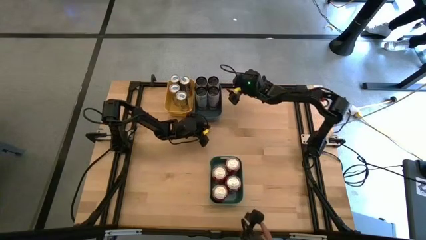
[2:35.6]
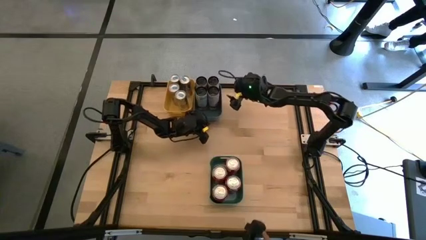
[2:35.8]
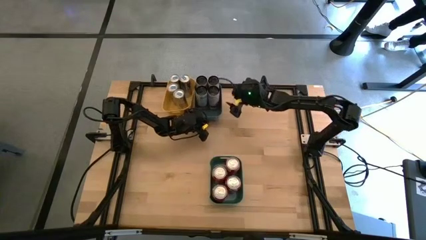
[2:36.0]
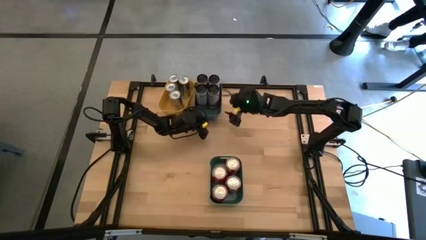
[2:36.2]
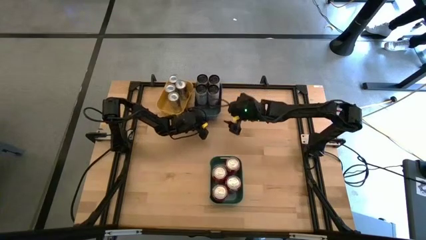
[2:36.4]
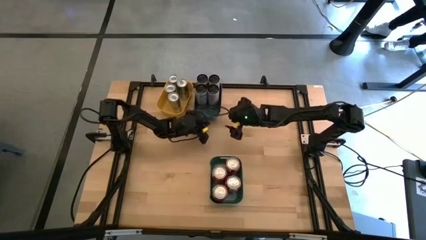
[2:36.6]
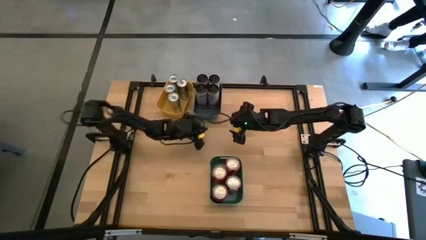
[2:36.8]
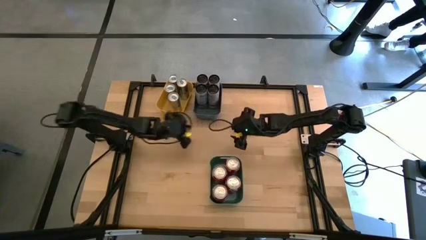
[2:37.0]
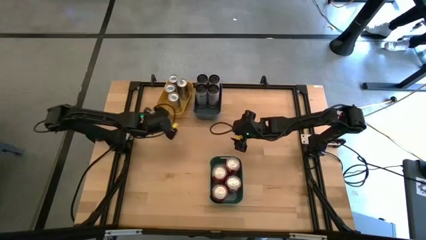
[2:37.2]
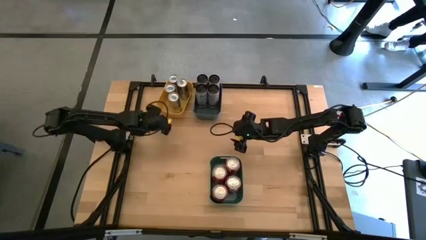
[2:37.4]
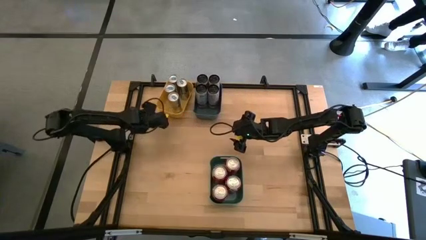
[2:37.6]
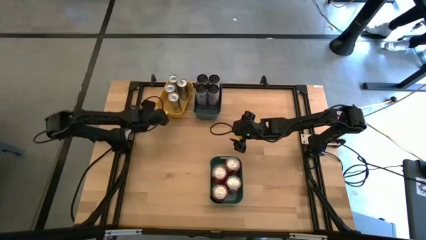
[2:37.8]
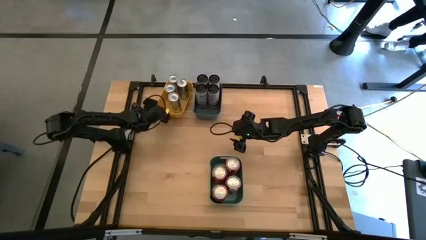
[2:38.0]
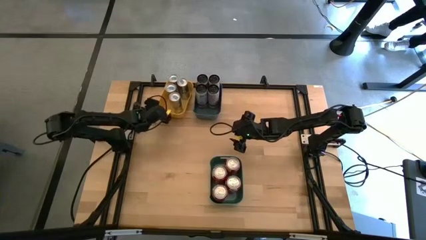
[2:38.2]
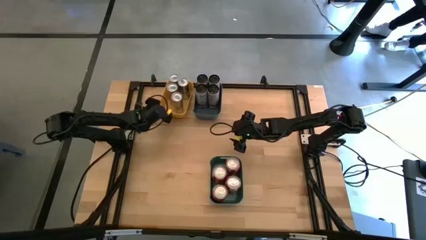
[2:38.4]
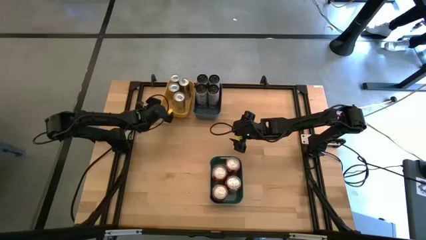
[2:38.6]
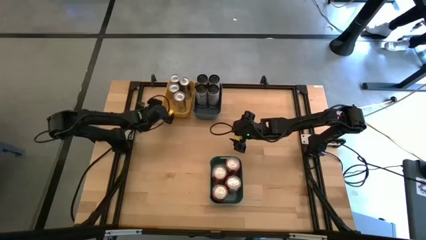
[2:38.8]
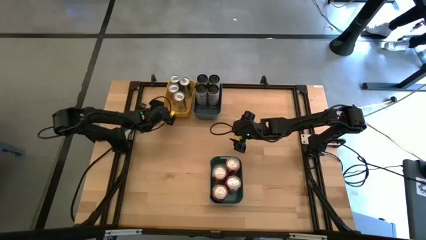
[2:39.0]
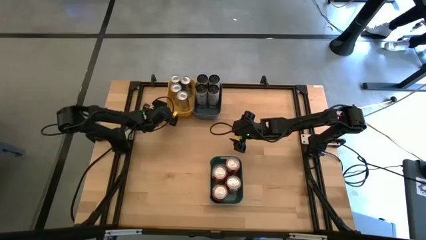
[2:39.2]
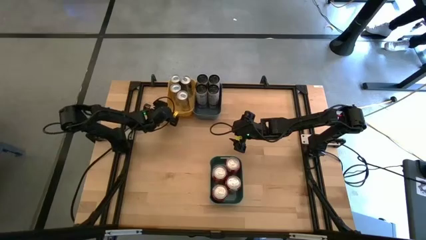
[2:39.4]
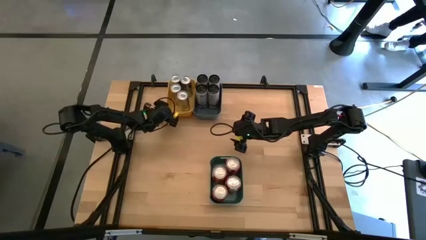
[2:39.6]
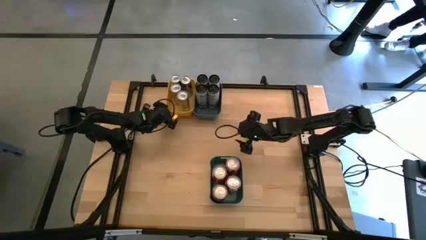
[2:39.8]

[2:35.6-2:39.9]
Task: Sort soda cans
Adjust the yellow bin

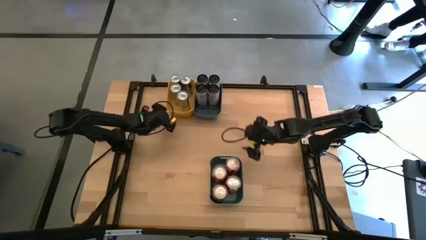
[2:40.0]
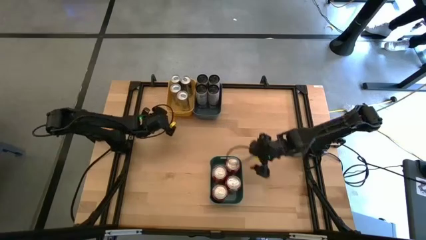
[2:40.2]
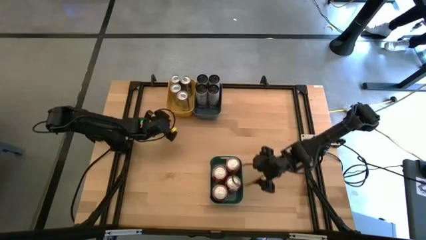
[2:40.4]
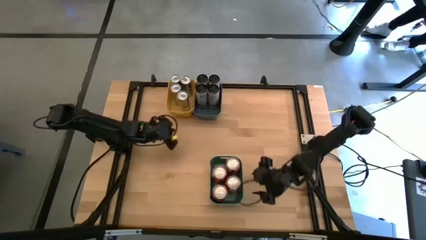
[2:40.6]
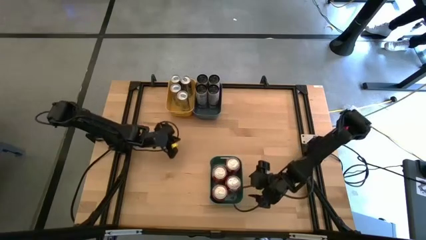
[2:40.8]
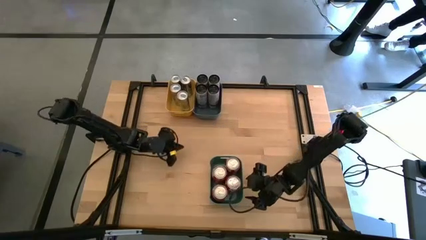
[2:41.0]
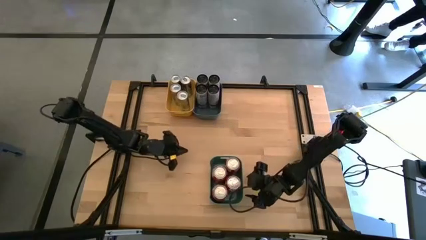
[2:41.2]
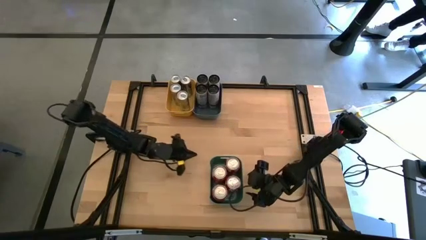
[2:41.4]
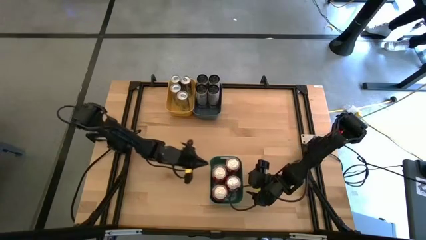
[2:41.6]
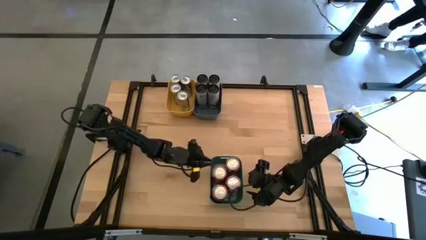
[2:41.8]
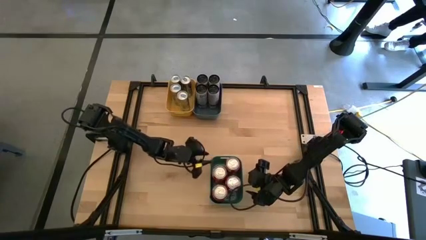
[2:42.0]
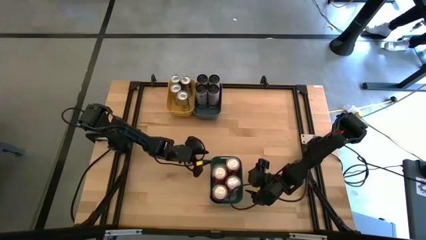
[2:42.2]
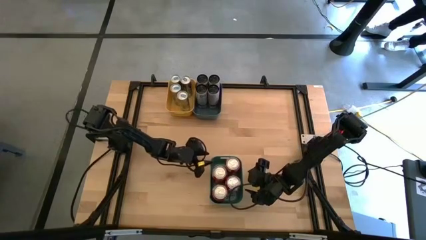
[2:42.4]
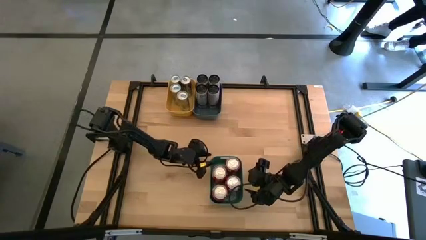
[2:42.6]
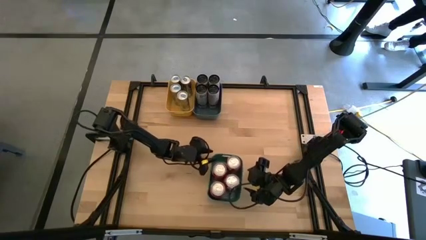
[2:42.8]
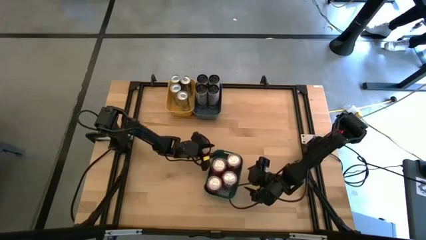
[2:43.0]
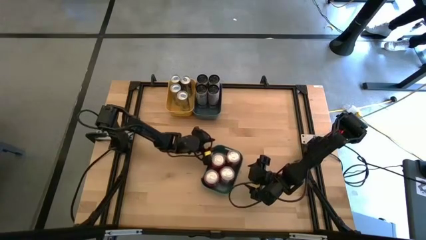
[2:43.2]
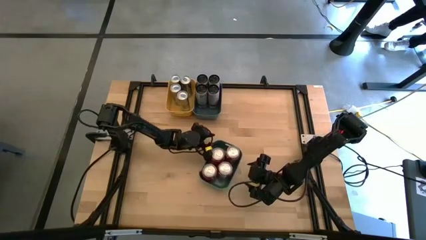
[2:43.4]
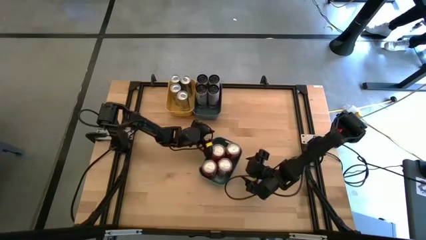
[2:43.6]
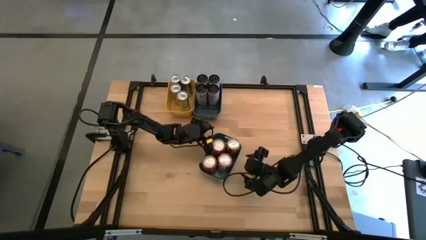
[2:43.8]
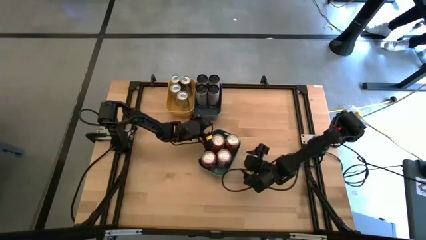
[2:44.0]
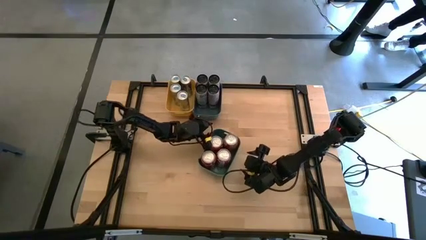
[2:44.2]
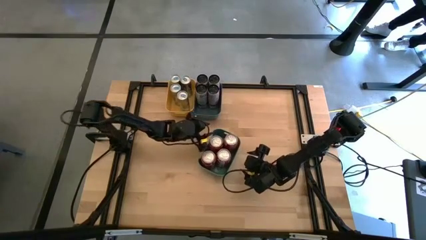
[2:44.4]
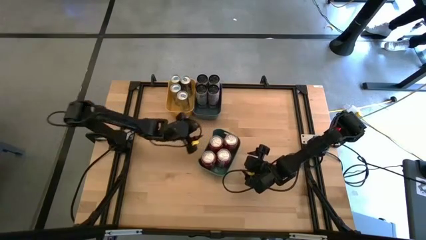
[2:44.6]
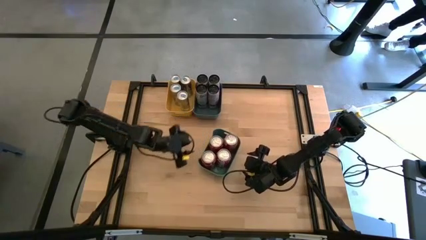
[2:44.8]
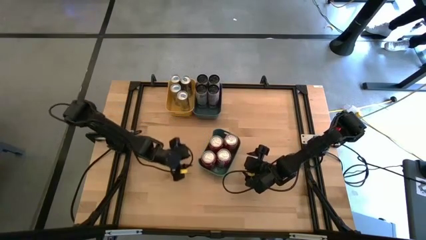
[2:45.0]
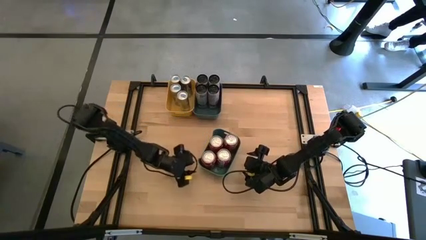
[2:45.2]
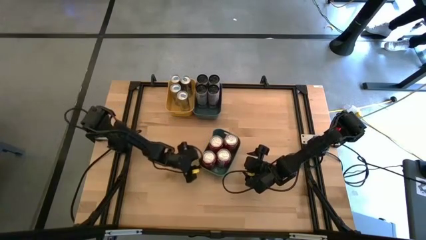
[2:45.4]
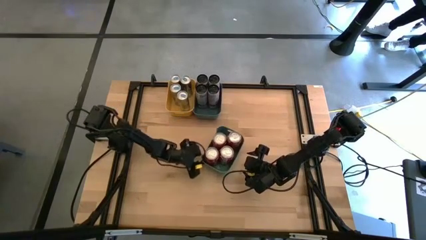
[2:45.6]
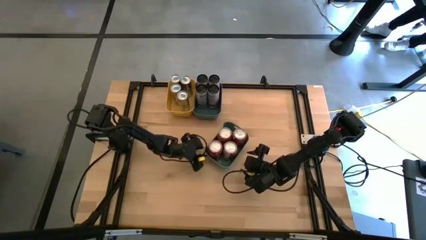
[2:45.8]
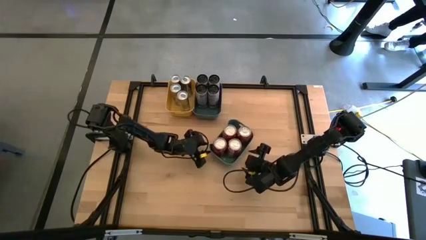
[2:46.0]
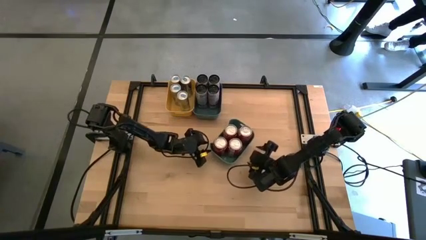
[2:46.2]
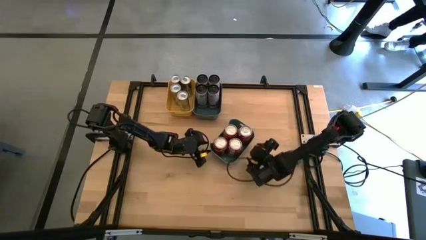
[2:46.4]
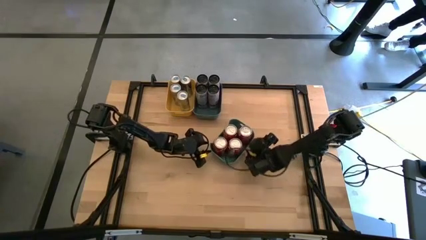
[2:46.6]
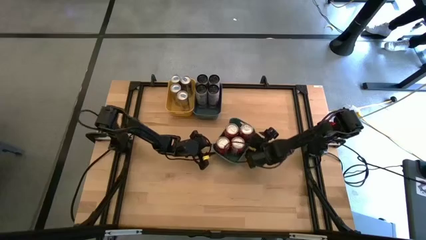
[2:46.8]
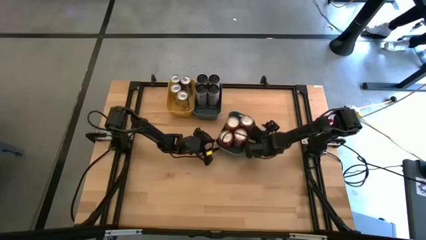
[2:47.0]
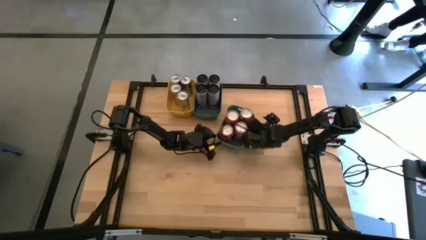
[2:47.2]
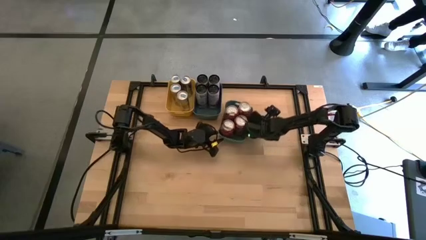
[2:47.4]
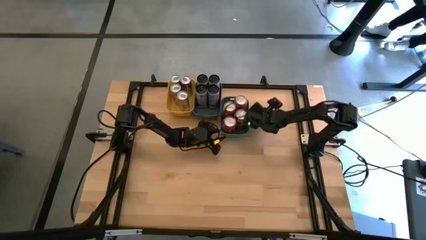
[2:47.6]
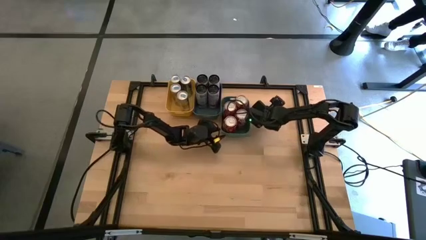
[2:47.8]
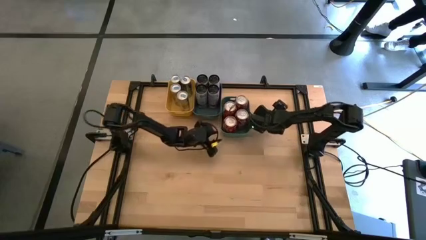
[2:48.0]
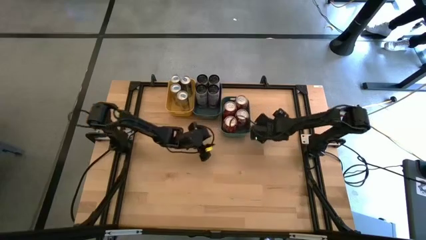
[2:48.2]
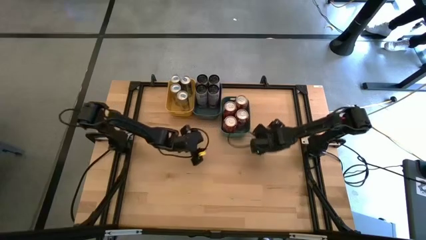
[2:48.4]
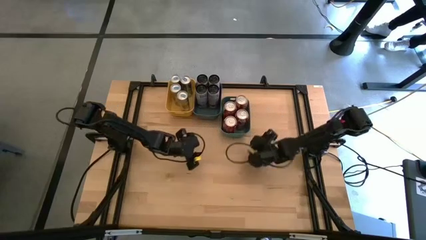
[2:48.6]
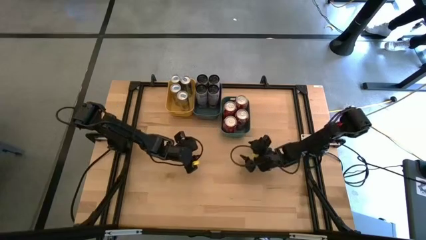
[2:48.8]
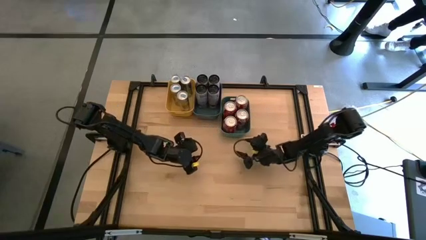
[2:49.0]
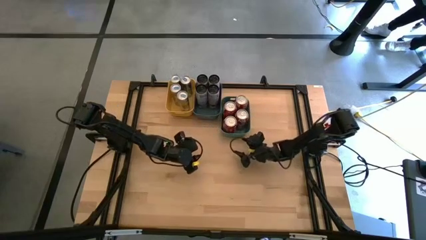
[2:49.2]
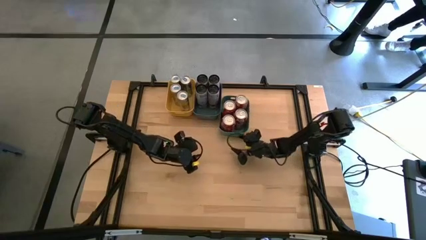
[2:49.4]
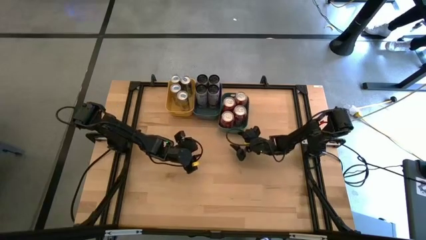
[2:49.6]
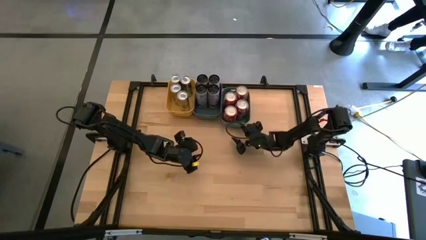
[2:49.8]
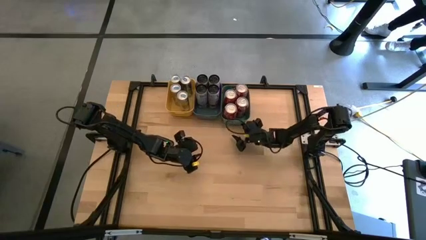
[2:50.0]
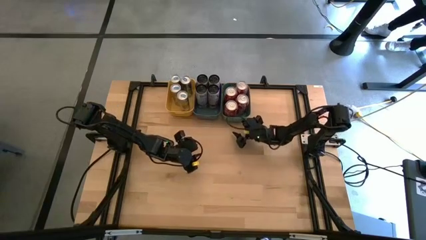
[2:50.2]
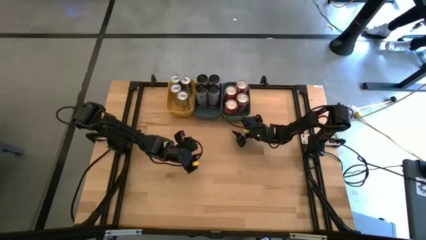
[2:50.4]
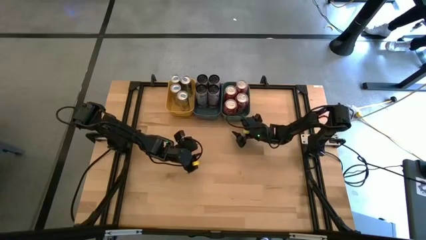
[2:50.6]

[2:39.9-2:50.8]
Move the green bin to the top beside the dark green bin
